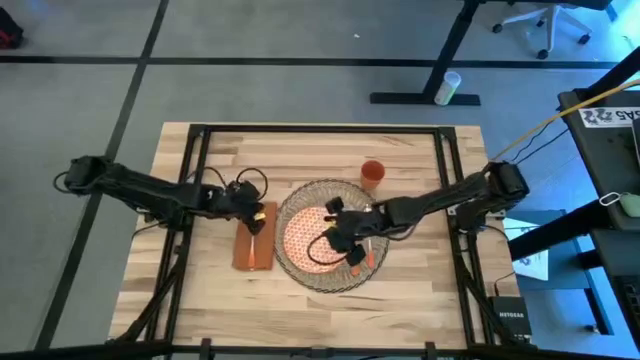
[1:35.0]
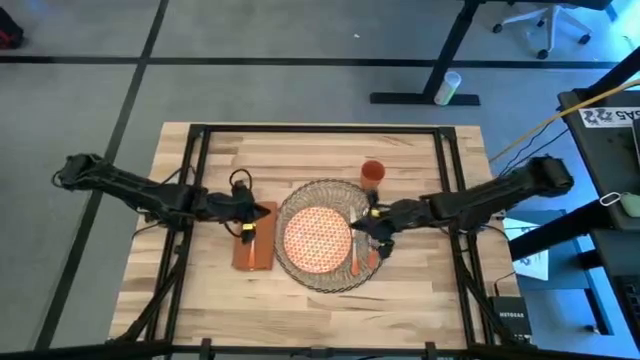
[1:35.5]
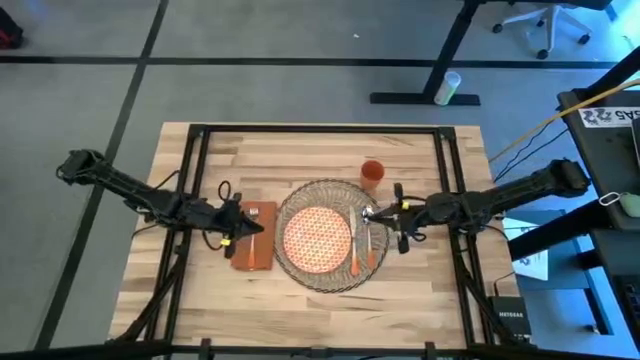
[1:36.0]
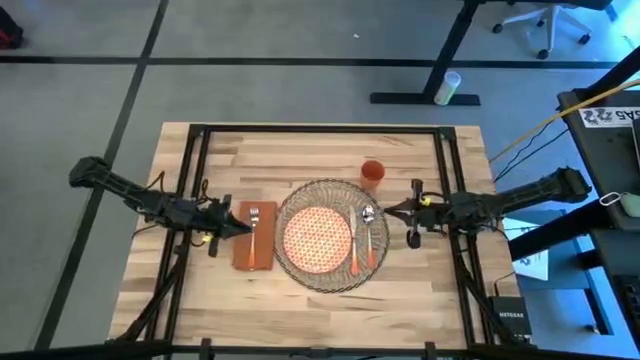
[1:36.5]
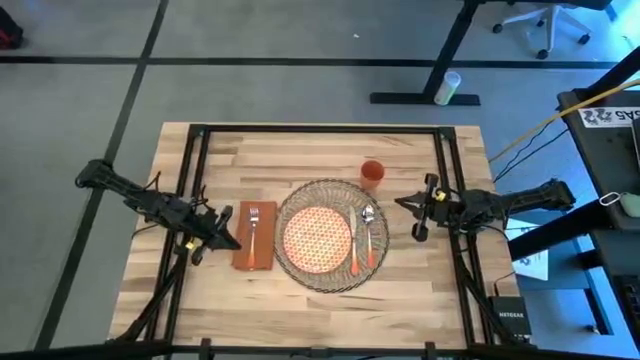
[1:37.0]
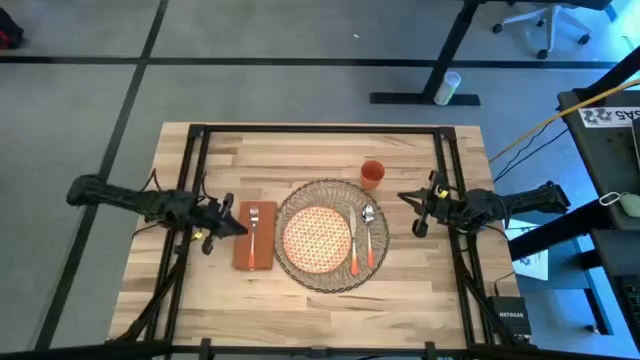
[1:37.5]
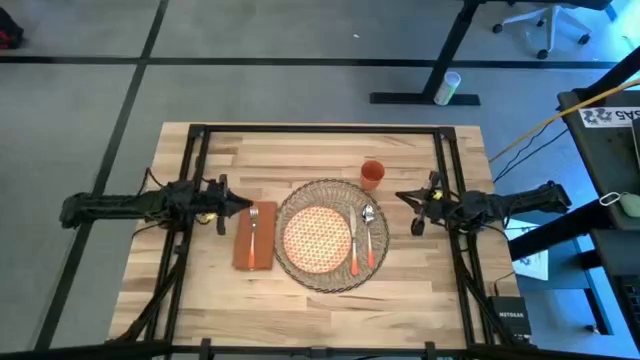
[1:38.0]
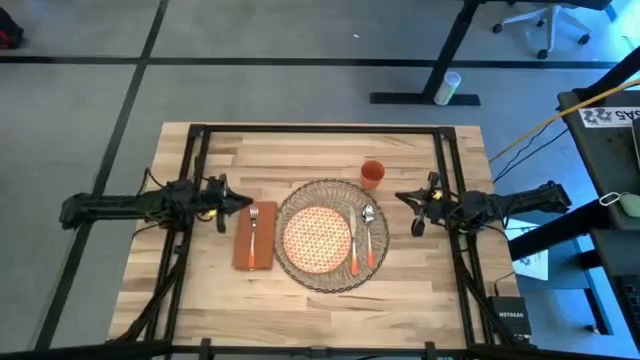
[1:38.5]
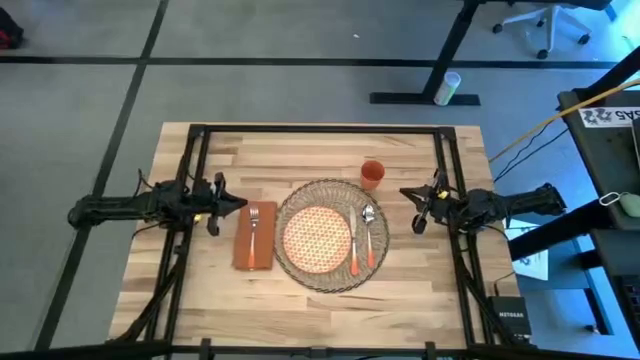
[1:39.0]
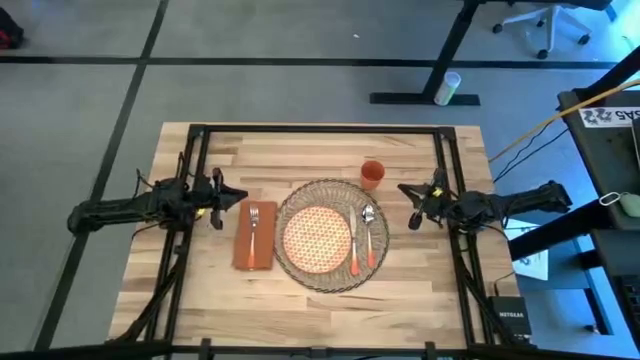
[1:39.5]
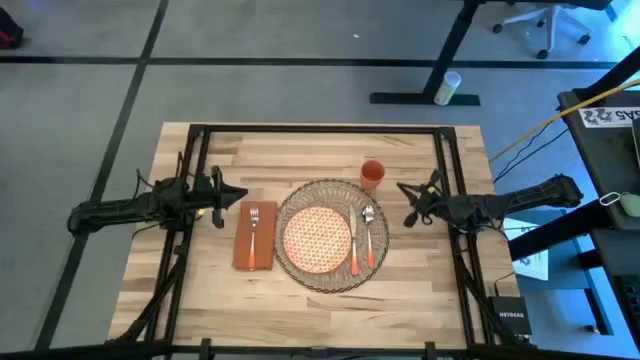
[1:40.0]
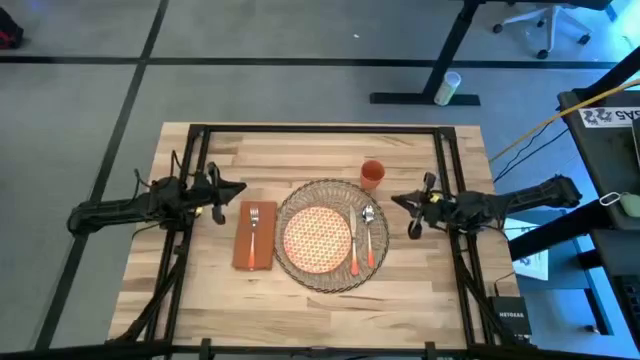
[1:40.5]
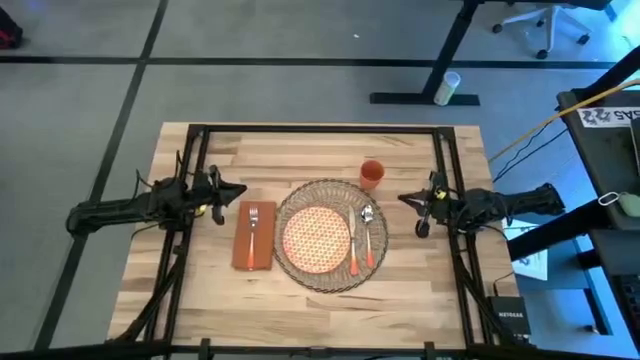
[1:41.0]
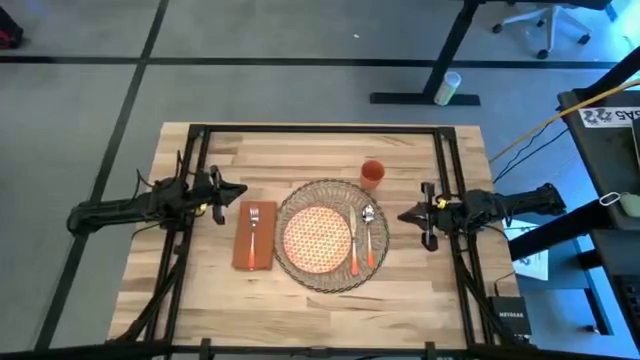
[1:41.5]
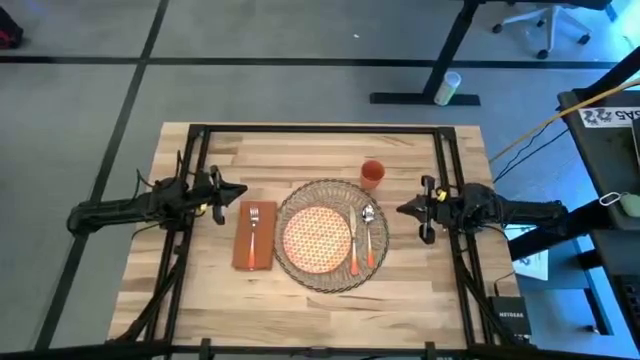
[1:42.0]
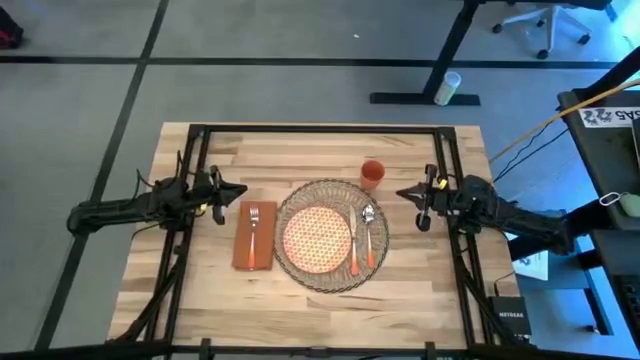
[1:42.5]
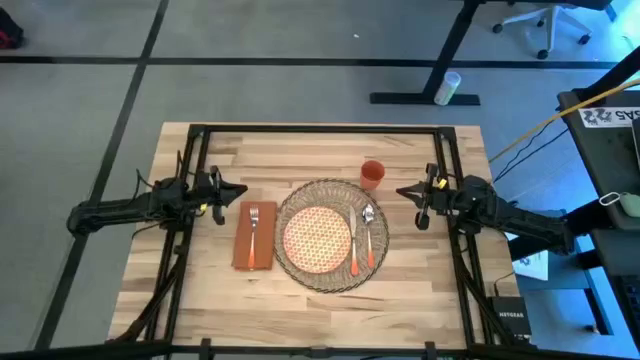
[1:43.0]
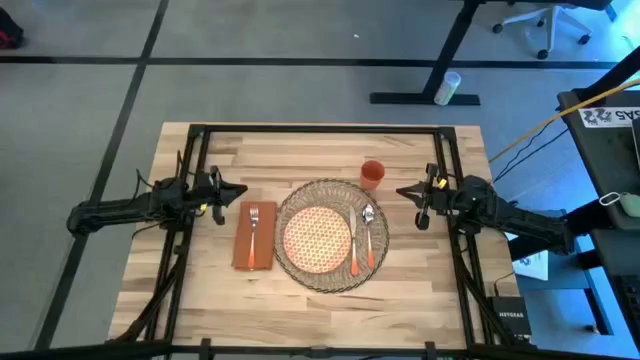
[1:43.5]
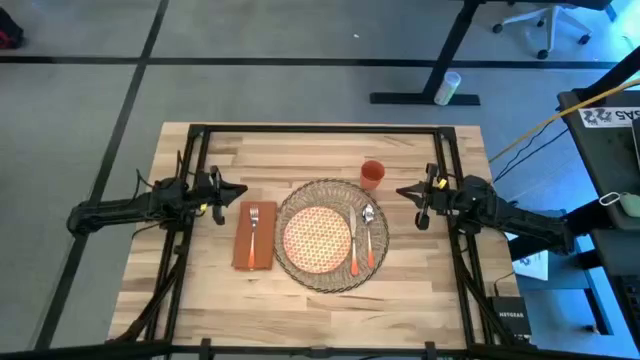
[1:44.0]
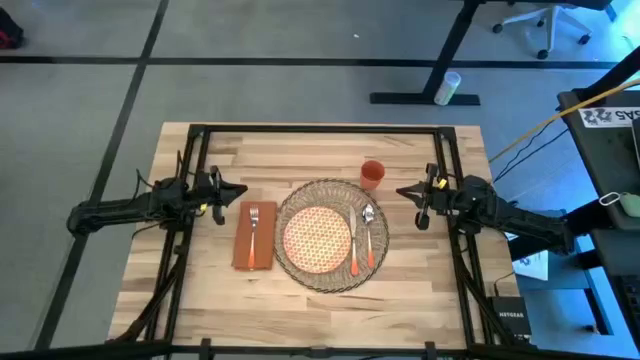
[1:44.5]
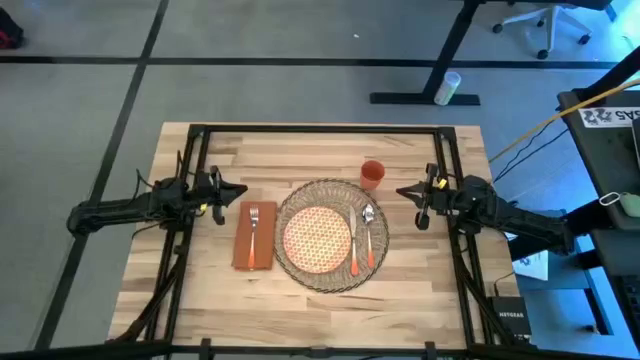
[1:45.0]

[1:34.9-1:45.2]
Task: Set table place
Return to Home Position

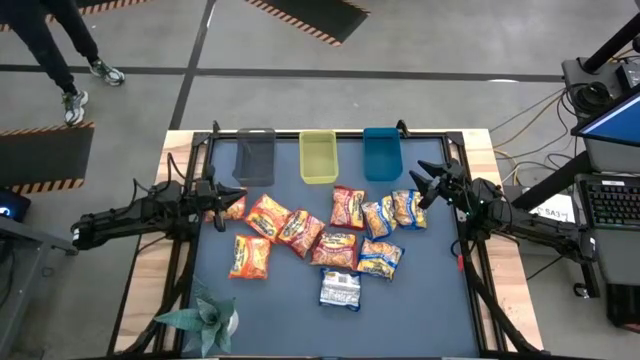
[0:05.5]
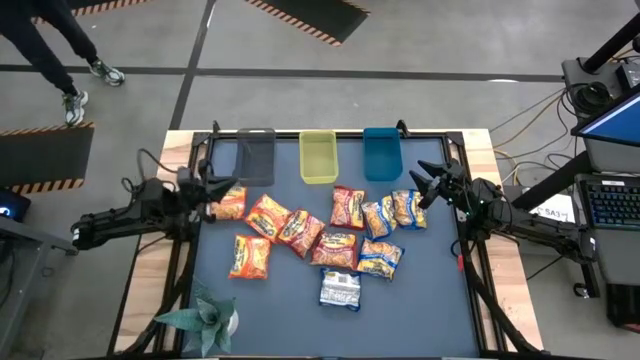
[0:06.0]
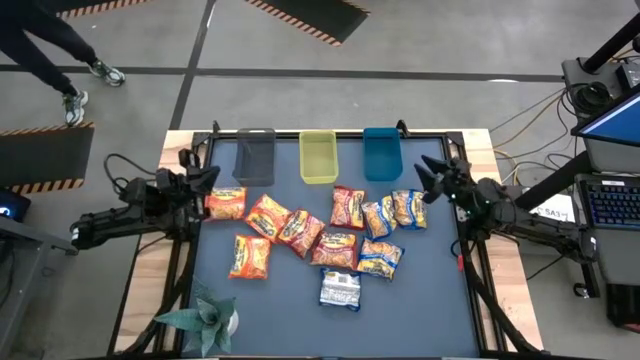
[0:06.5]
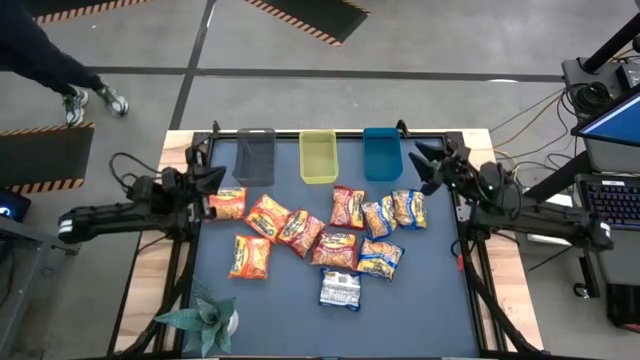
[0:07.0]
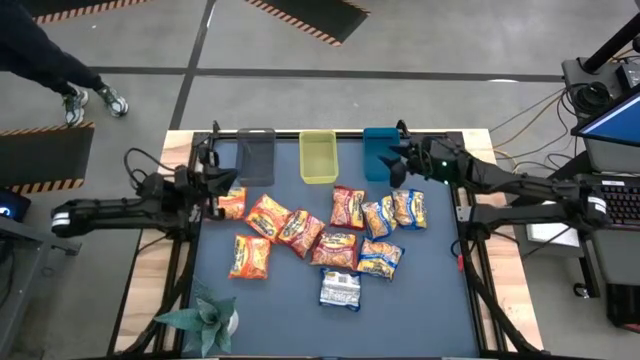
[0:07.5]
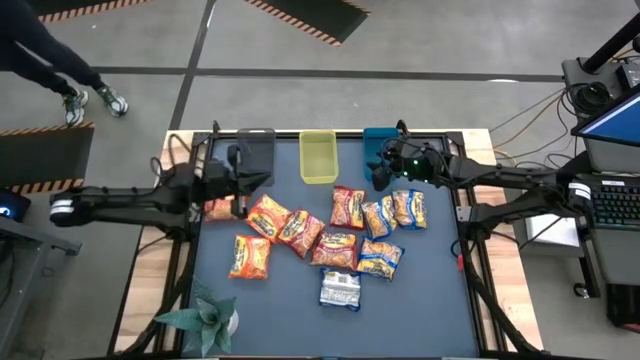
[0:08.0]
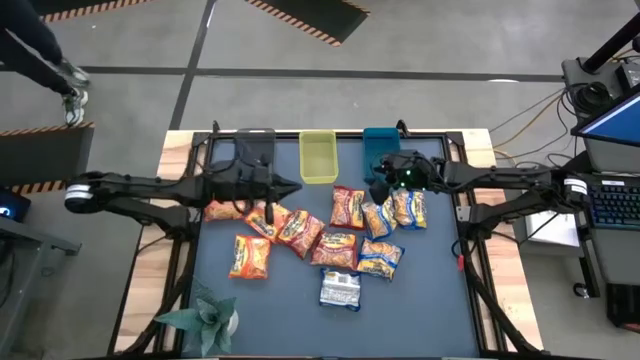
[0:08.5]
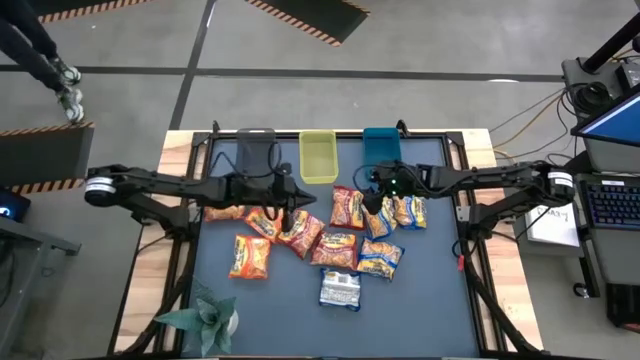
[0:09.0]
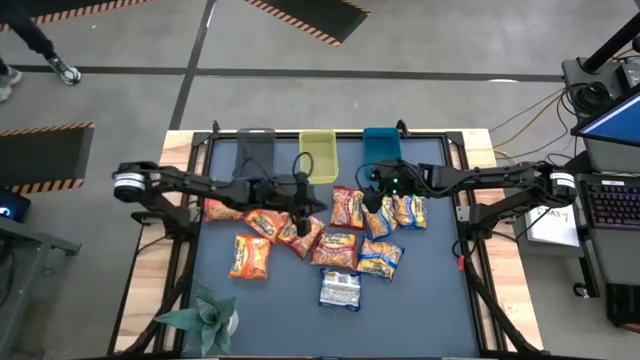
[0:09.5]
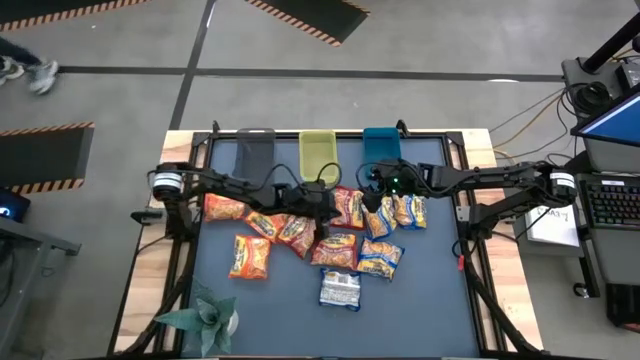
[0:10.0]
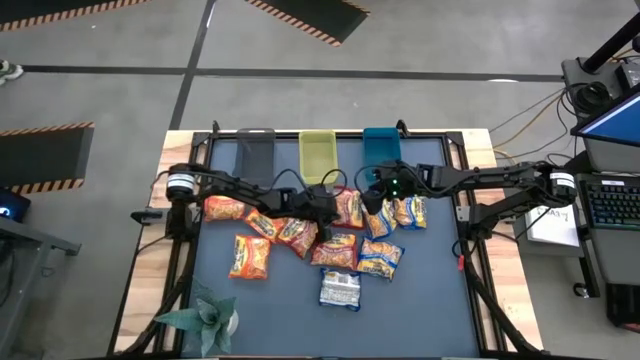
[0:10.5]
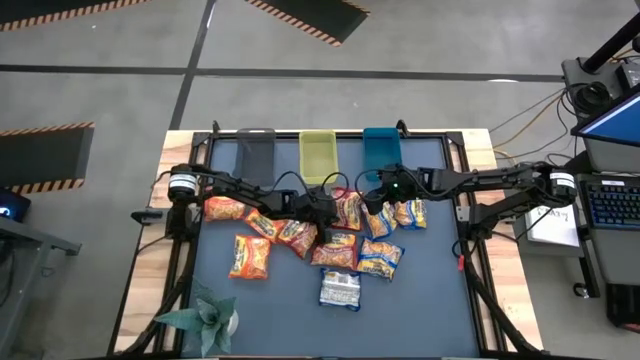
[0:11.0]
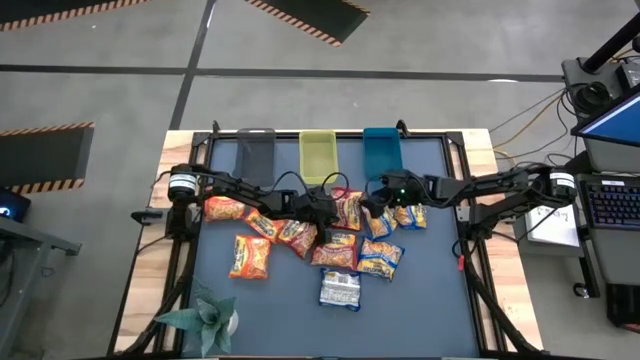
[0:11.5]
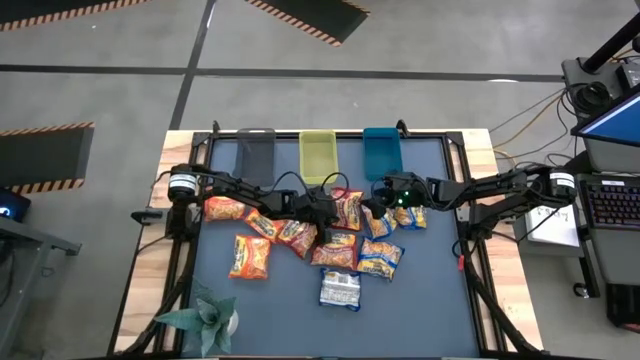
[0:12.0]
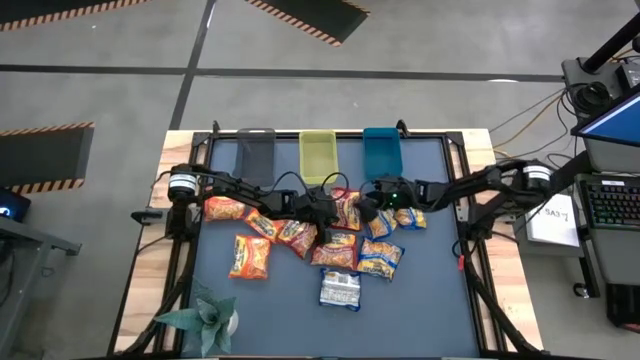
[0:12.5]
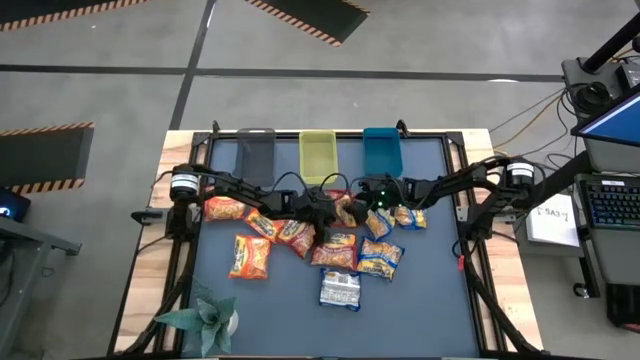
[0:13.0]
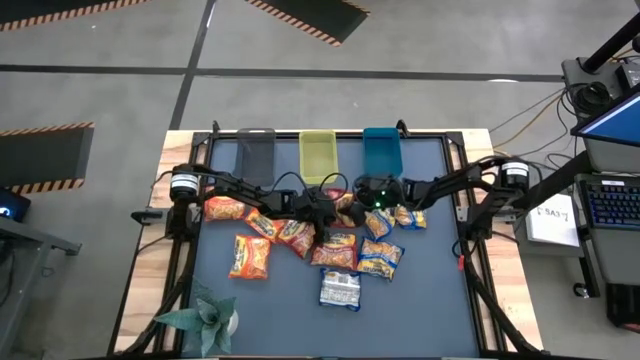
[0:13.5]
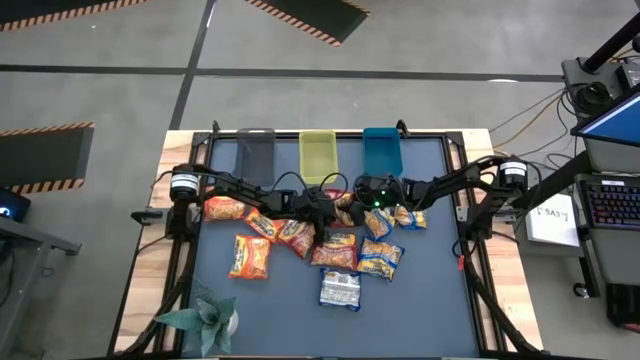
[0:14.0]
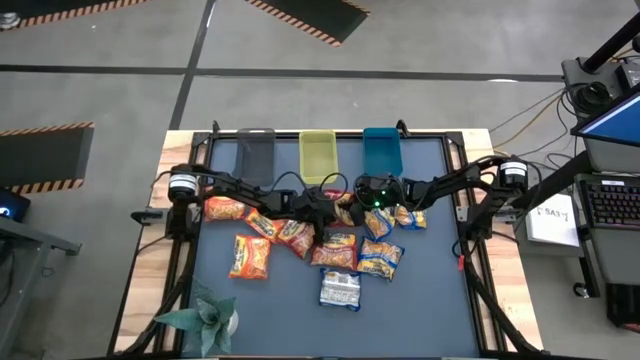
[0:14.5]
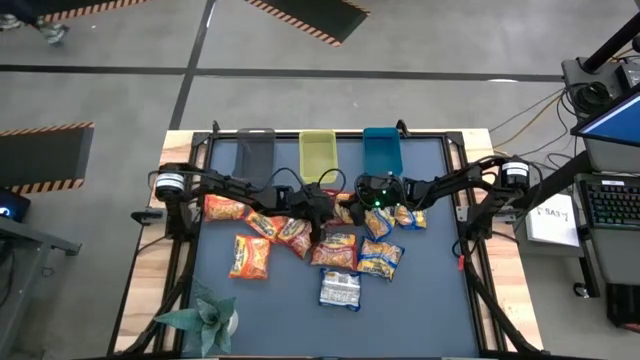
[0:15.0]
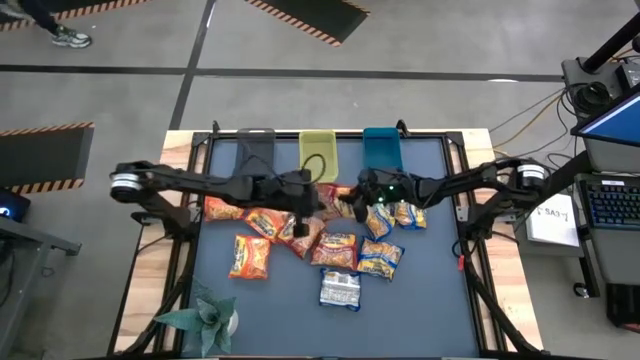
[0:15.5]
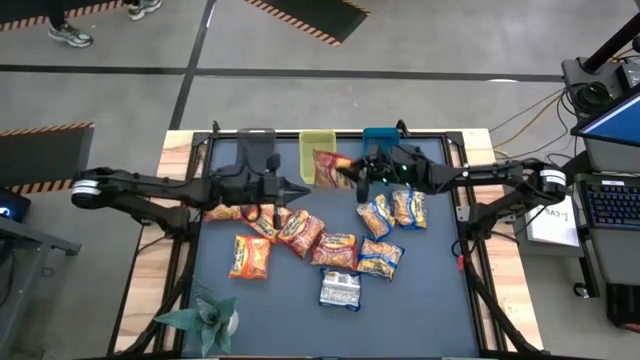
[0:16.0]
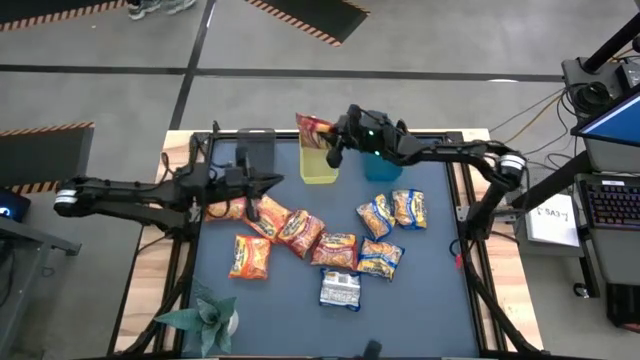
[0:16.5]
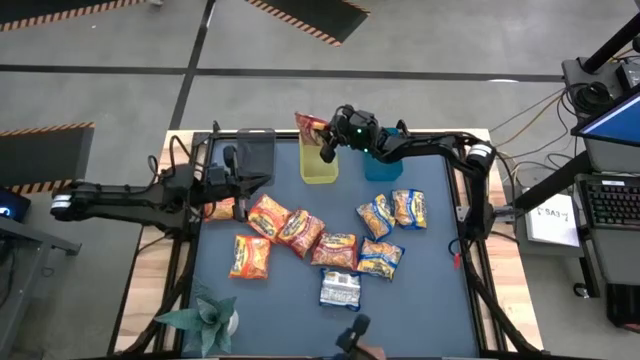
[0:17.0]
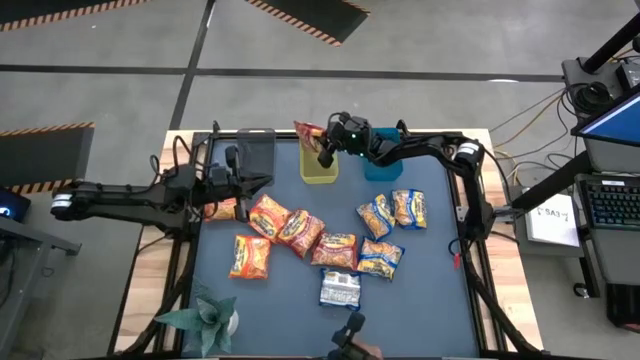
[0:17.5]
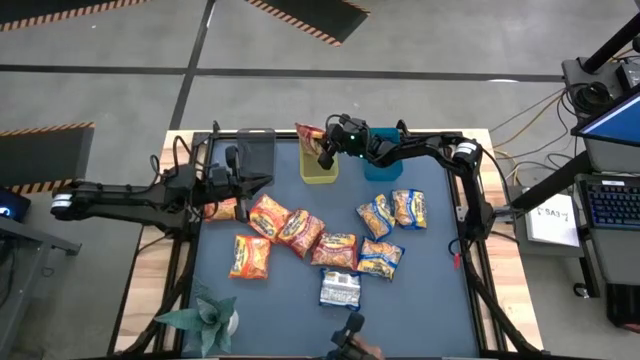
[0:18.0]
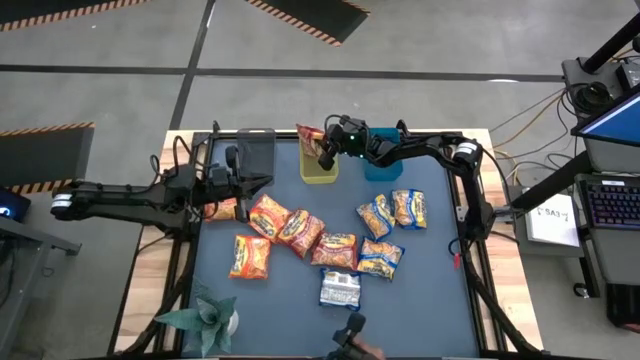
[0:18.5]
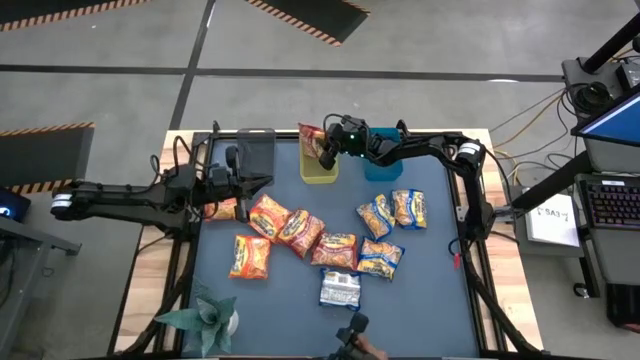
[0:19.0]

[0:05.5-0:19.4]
Task: Sort Maruchan noodles
Put the red noodle pack into the yellow bin
